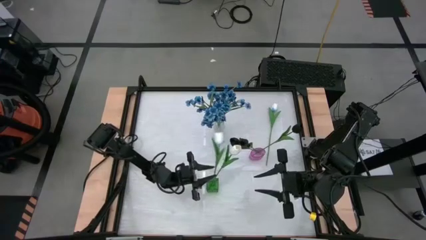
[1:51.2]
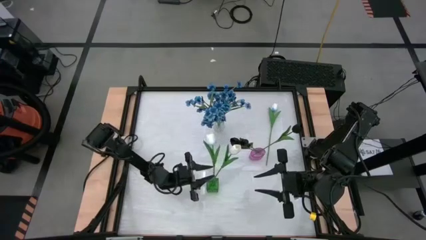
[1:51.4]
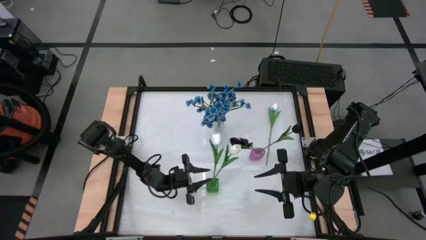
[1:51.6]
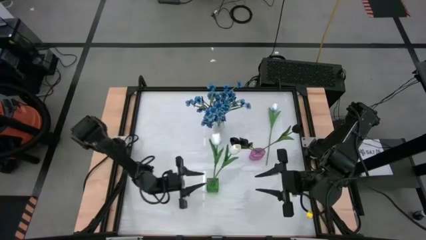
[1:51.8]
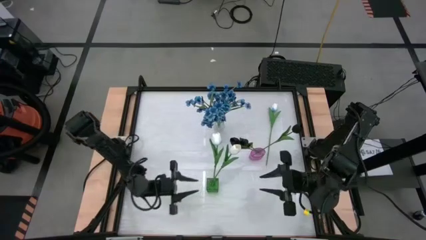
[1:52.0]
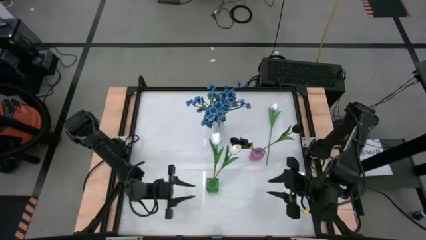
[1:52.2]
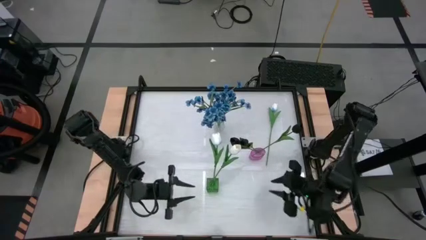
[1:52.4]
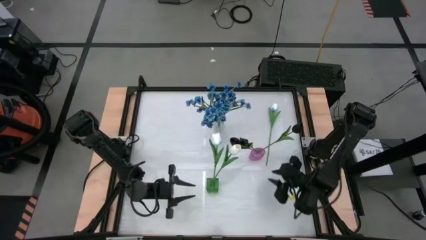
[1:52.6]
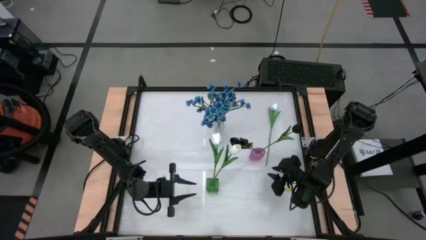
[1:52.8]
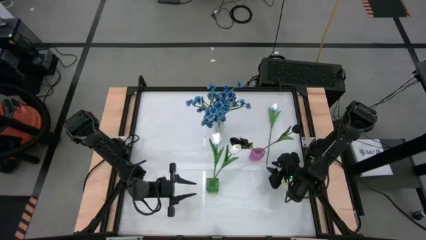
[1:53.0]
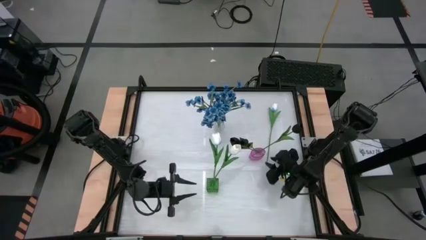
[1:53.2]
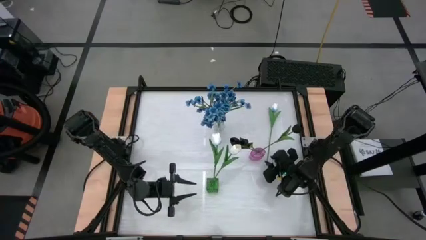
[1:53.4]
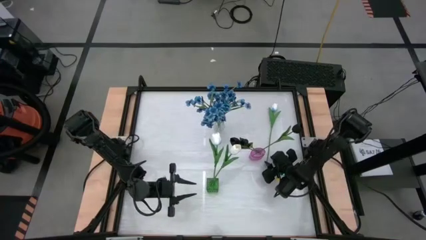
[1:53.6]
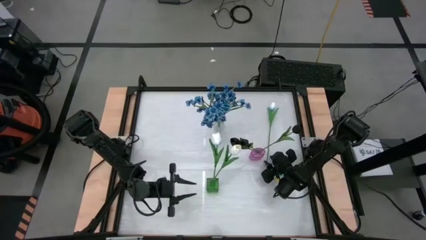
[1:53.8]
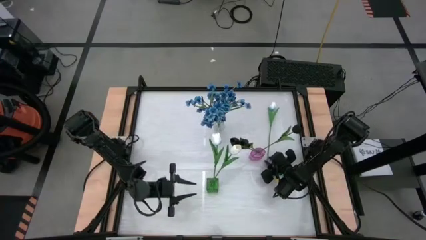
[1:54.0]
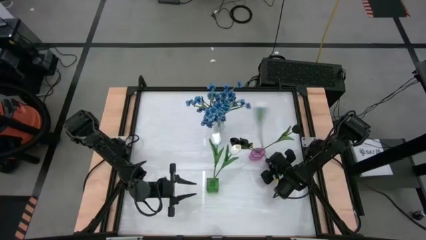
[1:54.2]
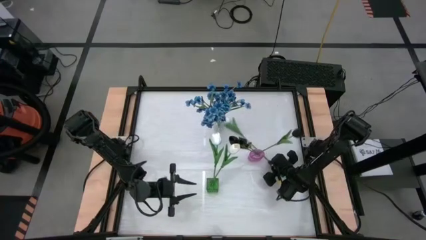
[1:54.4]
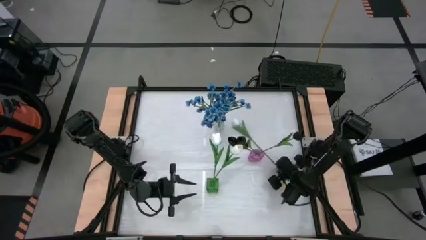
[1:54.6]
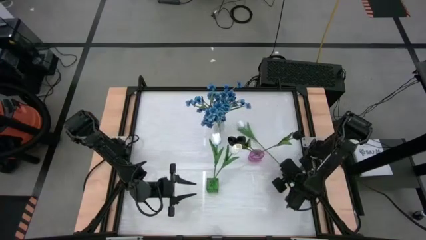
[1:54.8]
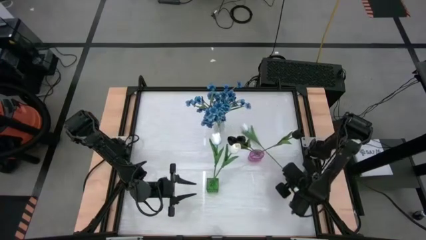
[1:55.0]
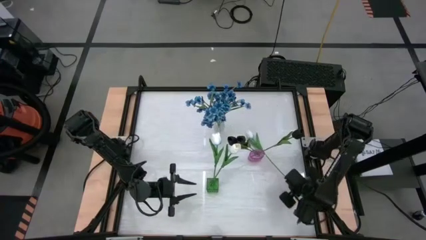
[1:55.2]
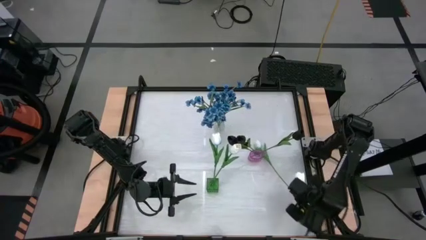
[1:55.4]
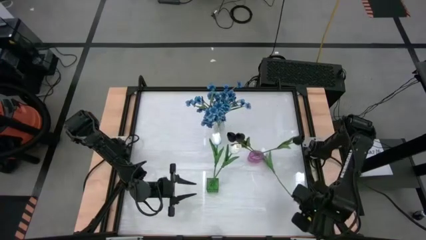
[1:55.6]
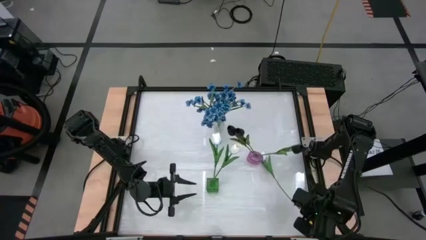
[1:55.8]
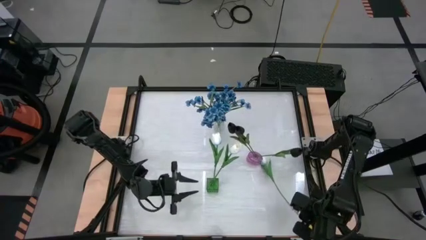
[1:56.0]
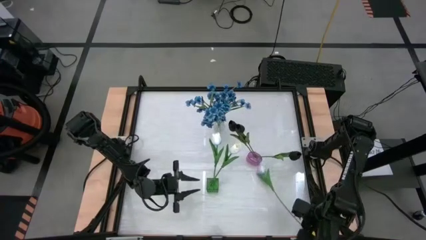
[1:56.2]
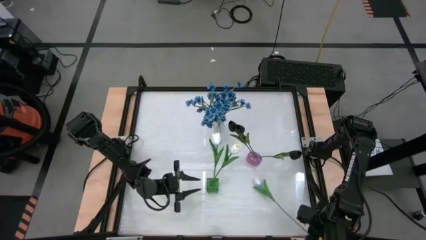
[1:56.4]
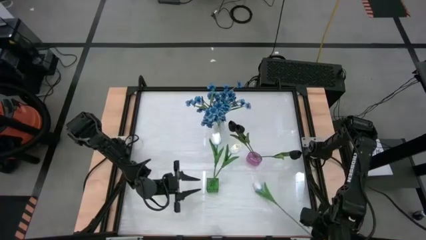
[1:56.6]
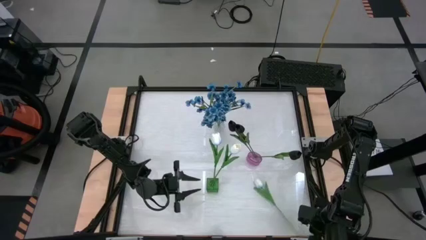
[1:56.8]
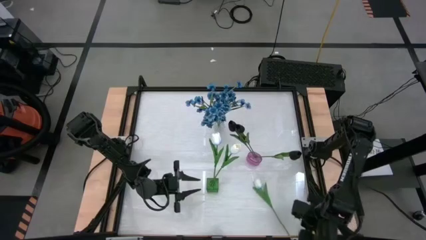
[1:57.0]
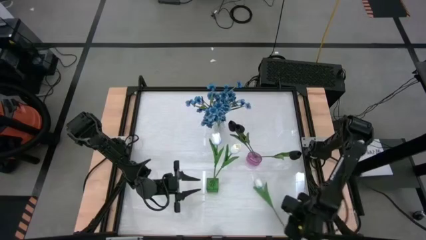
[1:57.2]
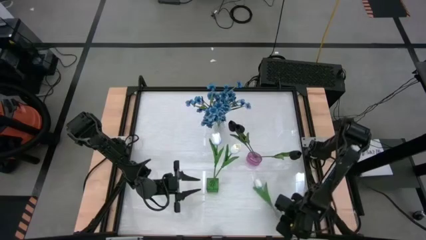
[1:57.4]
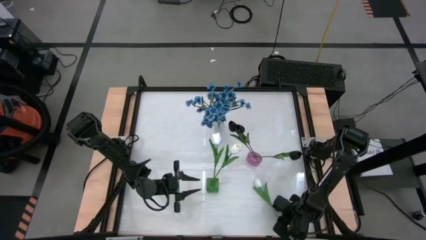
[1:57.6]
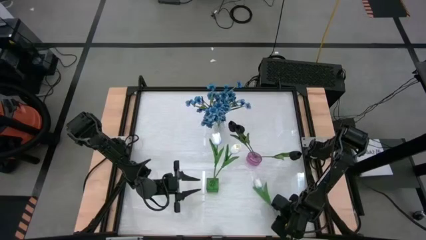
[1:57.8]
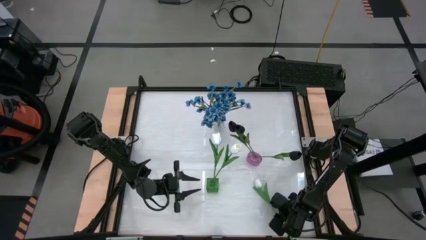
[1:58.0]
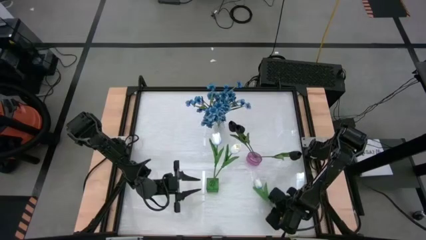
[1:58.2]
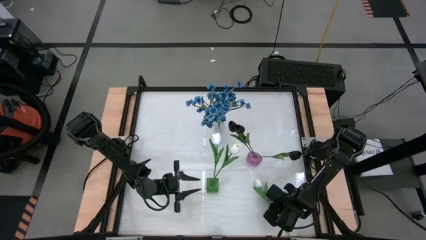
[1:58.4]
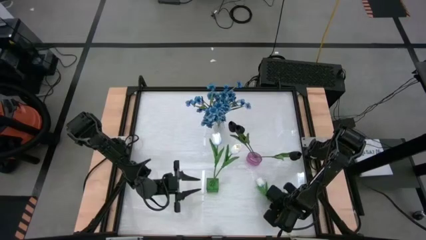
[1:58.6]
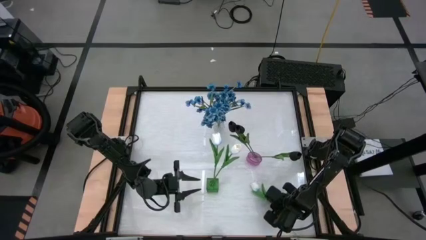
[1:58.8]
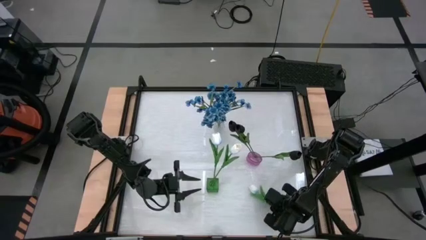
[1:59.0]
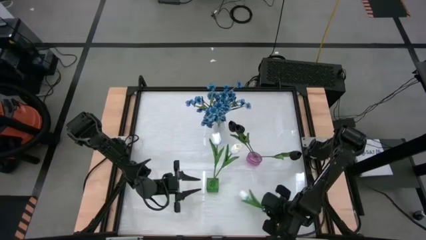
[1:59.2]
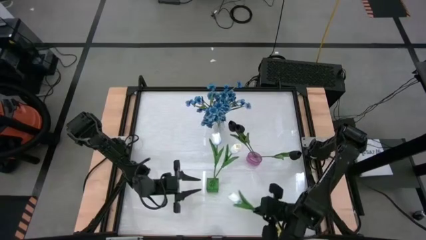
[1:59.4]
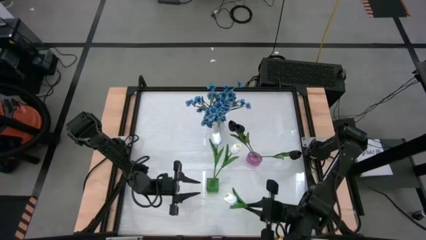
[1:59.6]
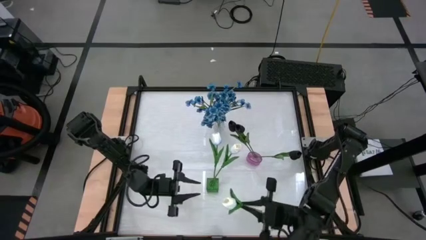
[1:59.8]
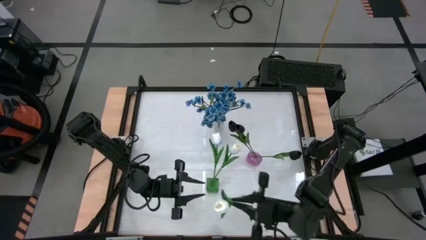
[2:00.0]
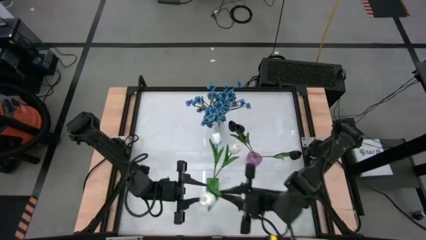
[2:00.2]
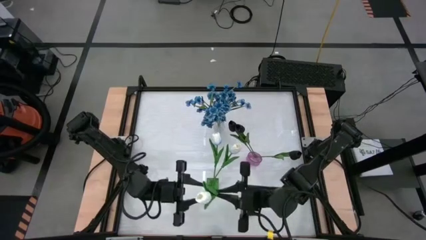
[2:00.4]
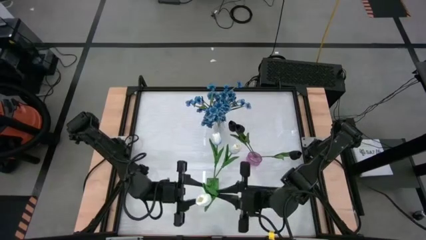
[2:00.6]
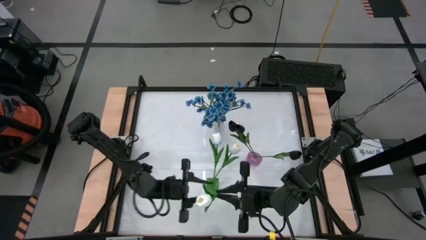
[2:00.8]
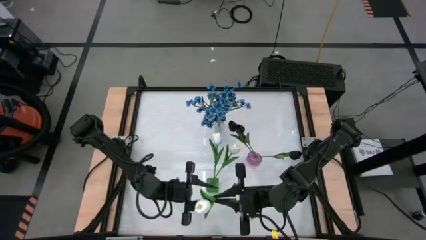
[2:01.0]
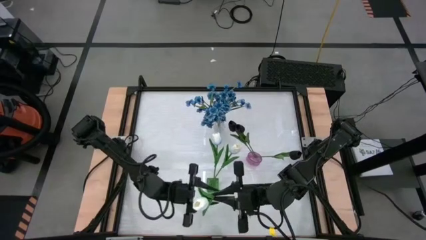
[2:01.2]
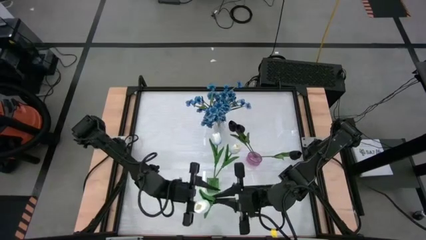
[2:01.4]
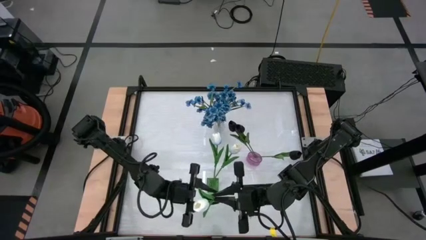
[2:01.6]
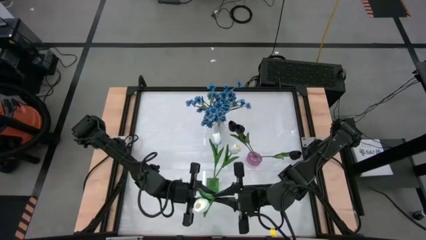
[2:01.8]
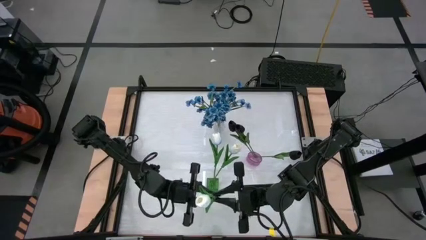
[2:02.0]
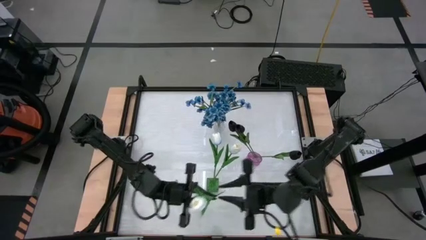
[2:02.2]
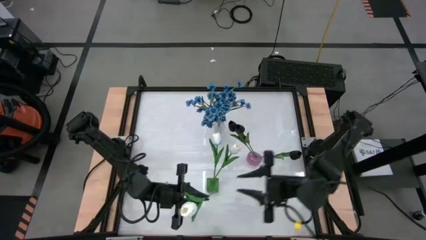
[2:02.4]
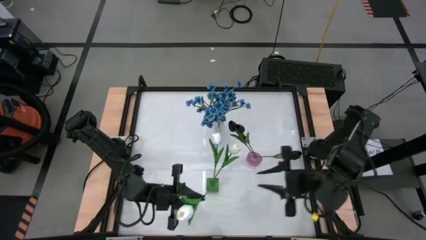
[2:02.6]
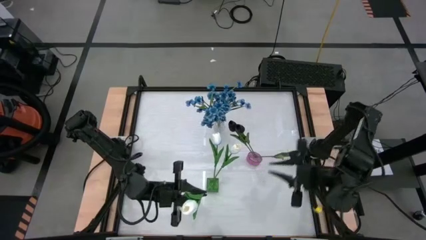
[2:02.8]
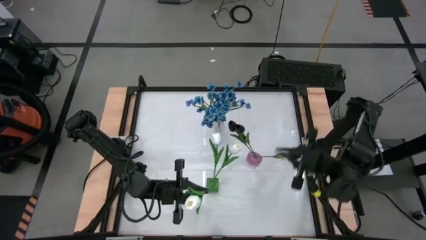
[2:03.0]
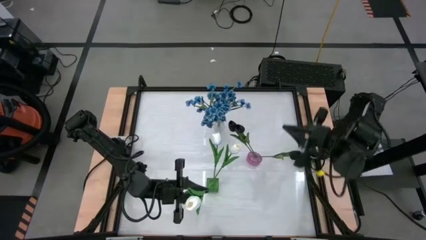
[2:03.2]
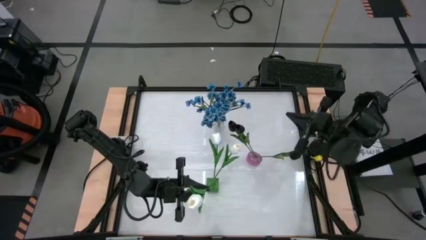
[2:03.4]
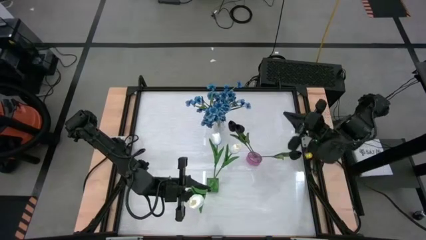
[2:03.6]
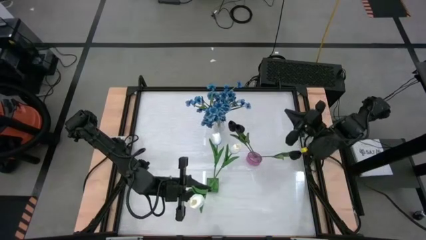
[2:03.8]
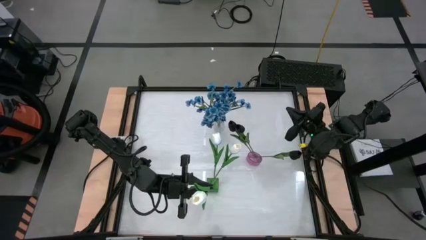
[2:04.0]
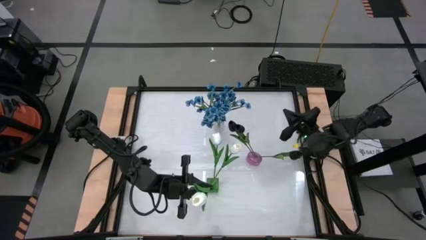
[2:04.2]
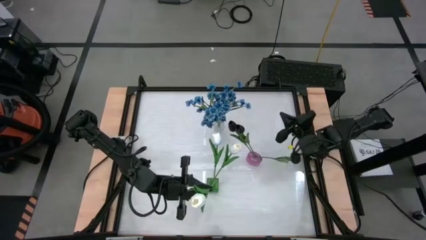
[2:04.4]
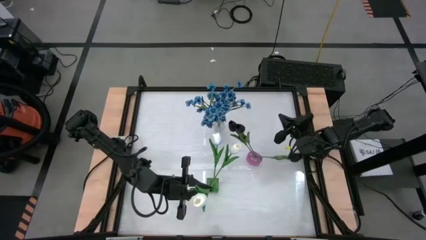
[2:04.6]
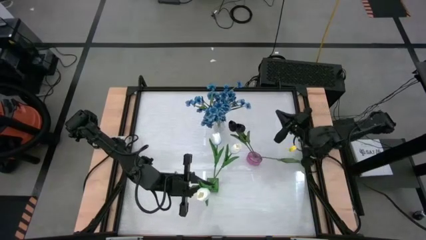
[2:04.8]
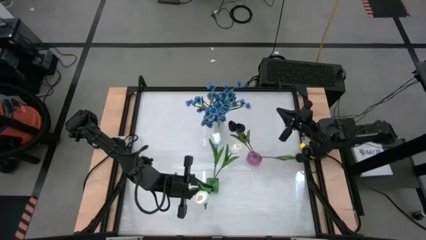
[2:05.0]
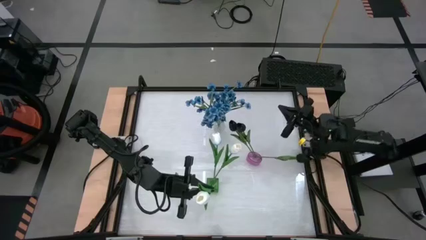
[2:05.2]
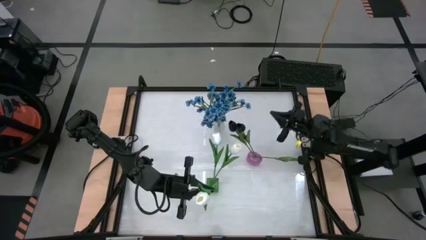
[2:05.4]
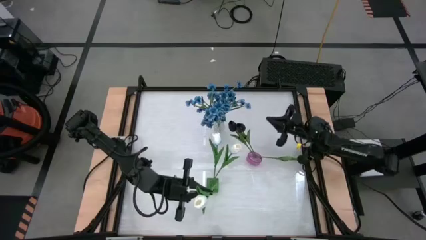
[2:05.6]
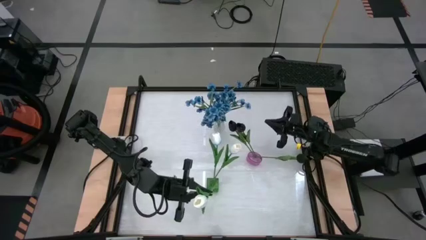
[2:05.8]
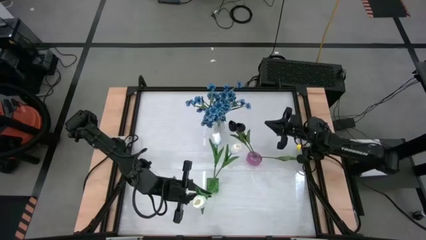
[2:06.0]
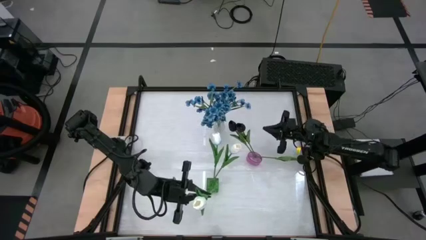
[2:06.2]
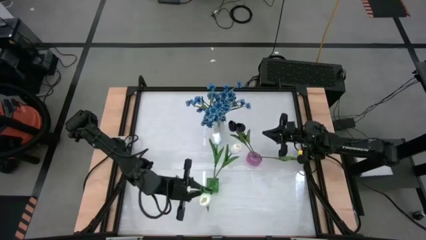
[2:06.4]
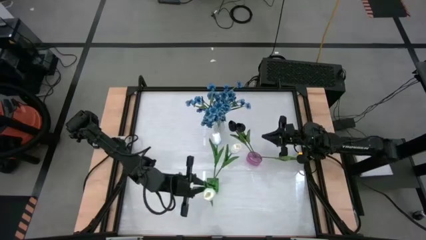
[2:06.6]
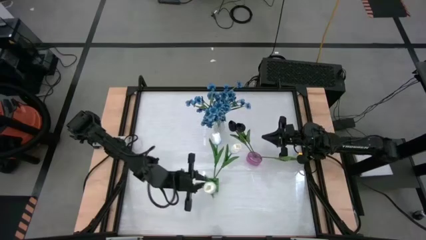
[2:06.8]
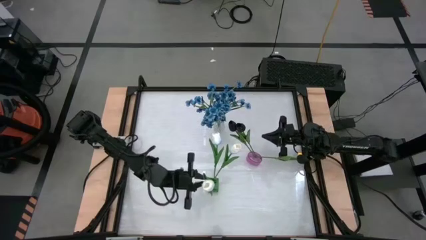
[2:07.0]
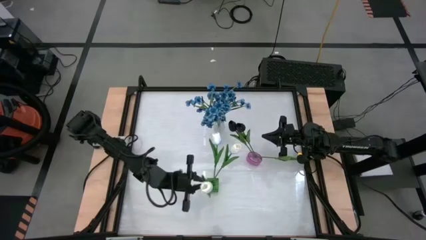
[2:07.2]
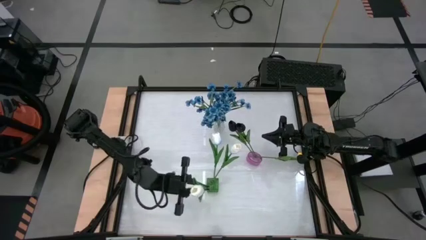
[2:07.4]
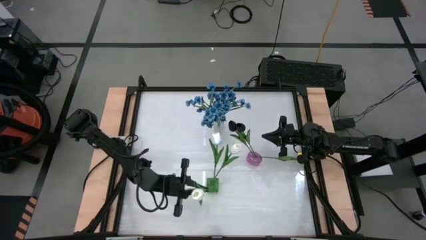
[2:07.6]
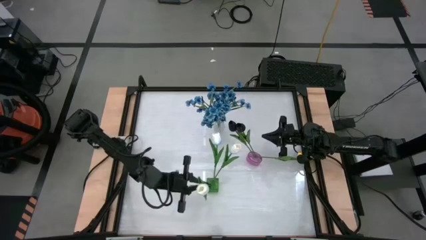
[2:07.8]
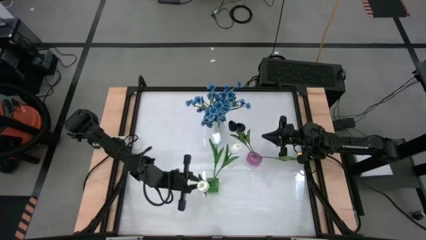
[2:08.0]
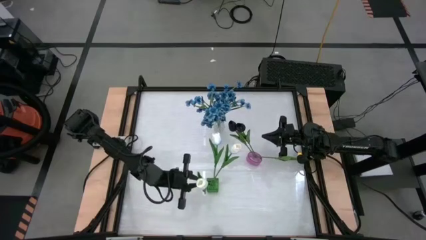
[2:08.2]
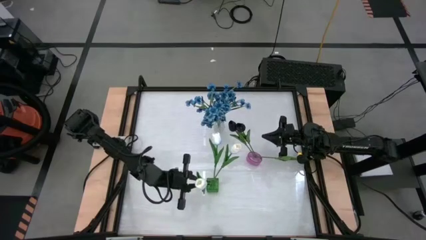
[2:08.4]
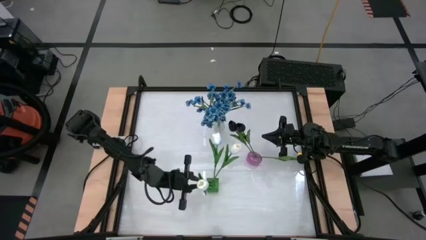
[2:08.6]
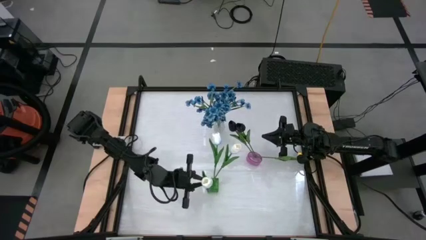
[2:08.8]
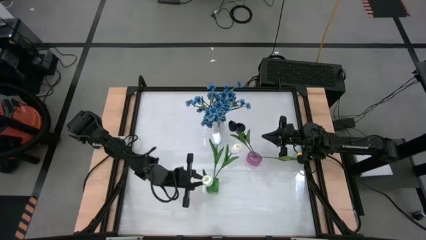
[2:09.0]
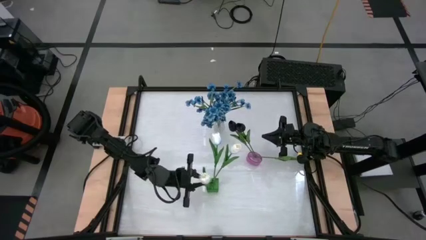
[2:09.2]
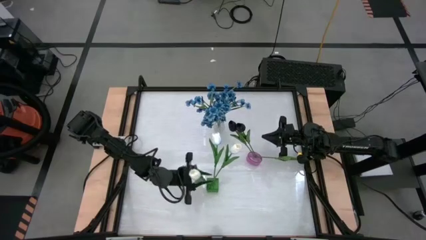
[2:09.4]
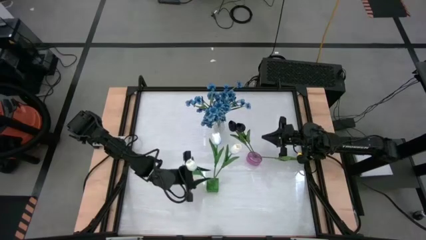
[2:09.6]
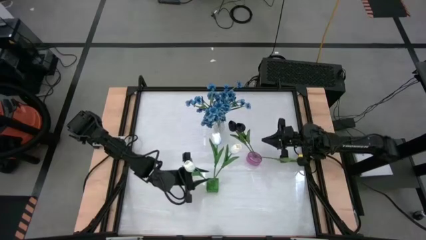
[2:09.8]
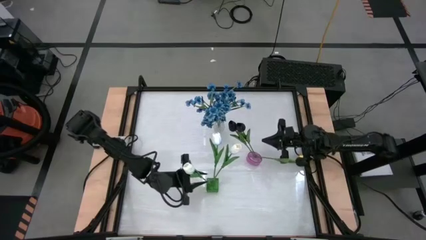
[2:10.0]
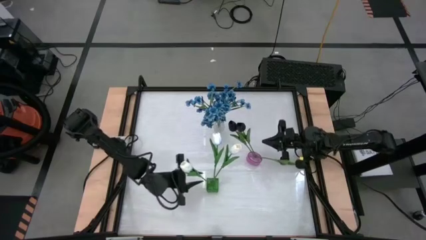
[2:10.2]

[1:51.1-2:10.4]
Task: Sort flowers into vase by color
Put the white tulip into the green vase
